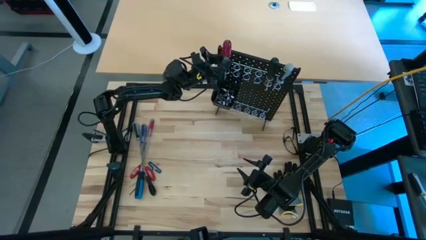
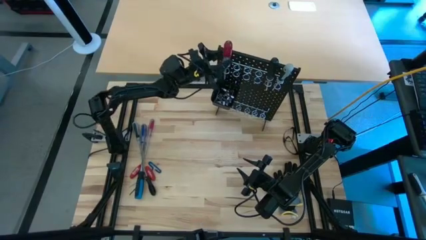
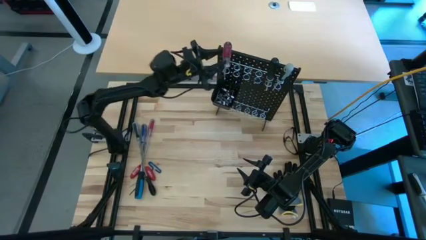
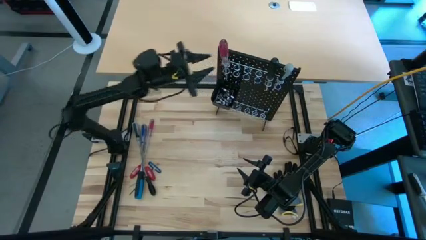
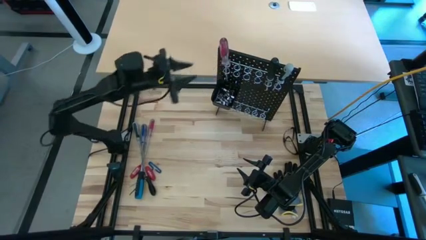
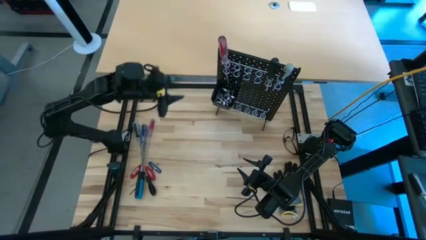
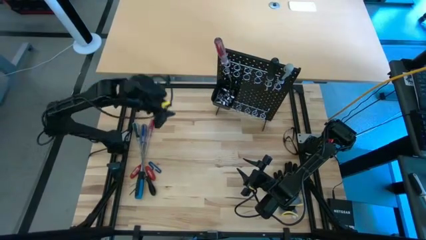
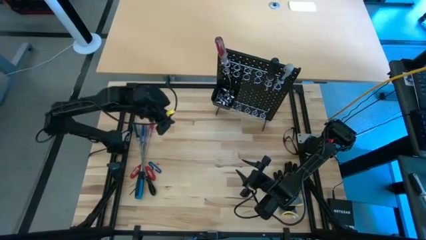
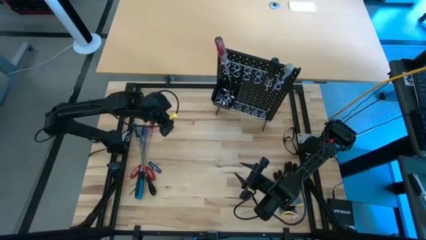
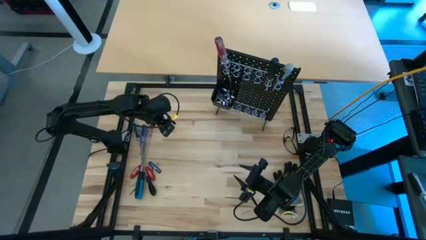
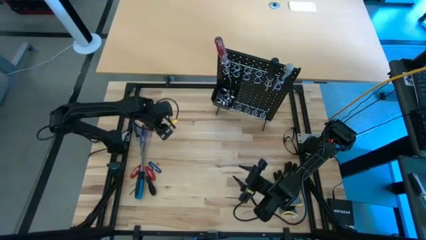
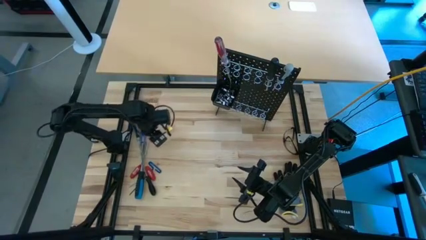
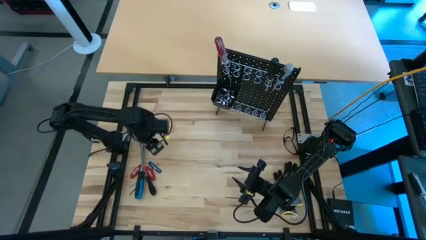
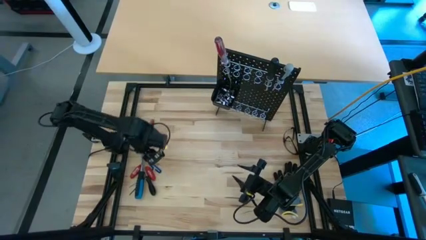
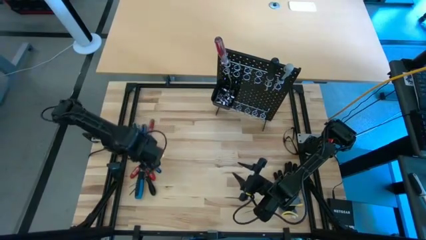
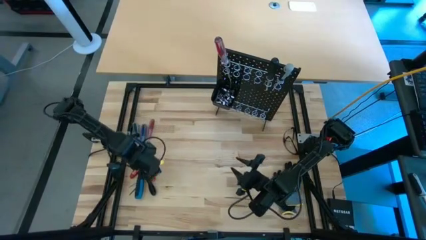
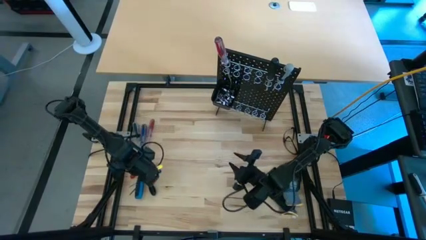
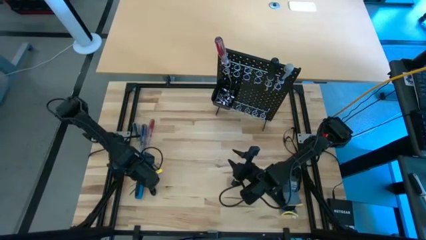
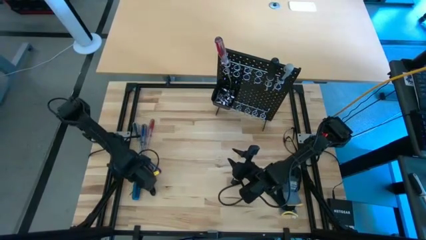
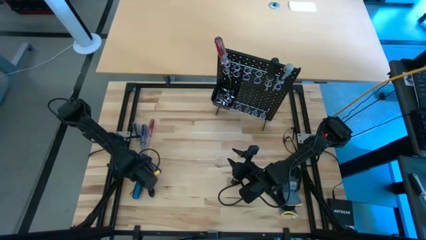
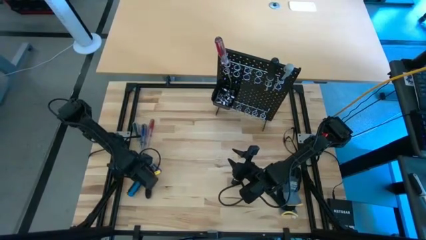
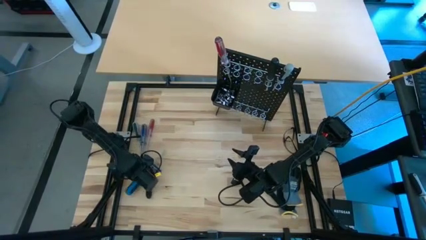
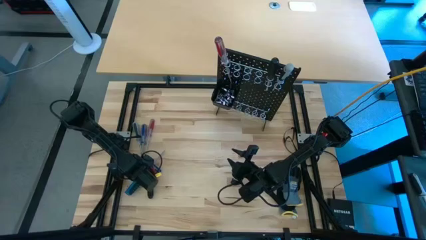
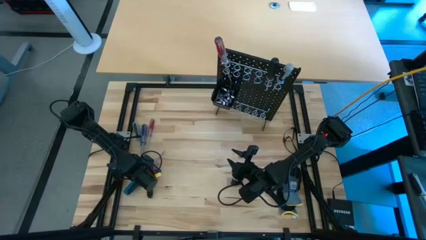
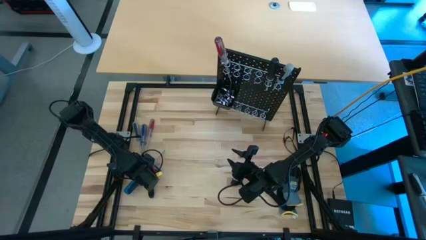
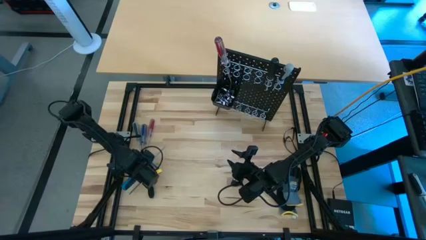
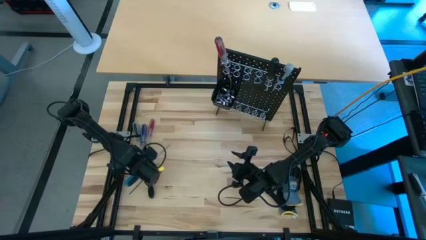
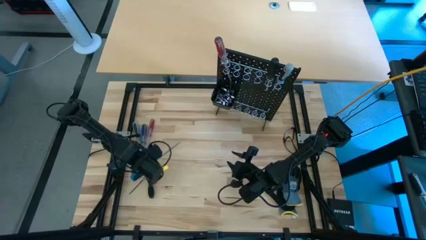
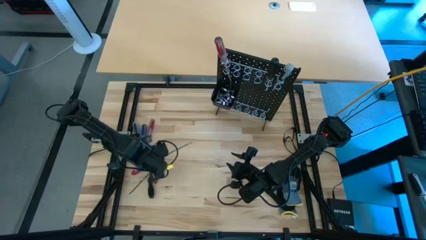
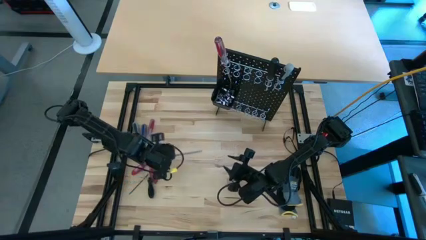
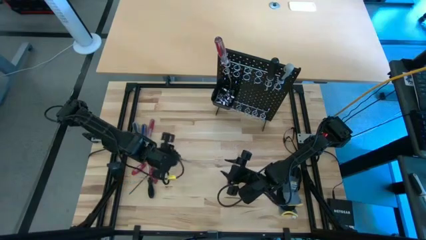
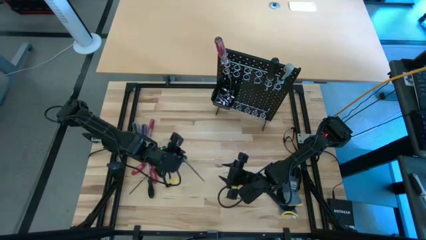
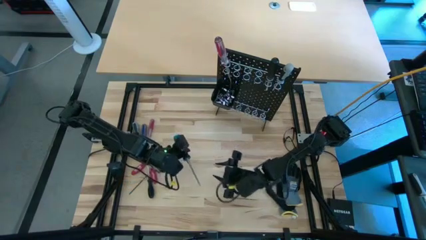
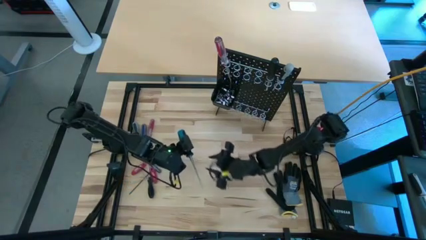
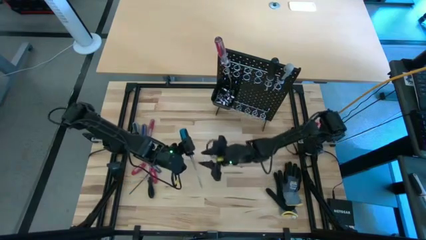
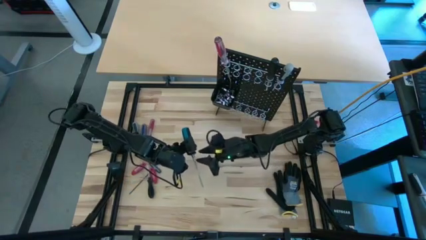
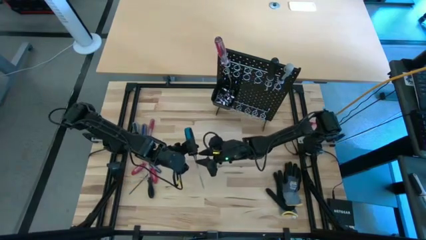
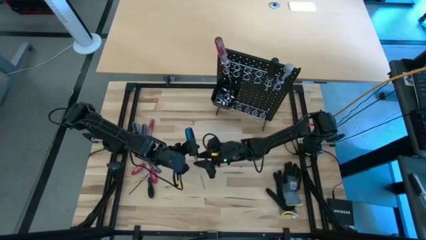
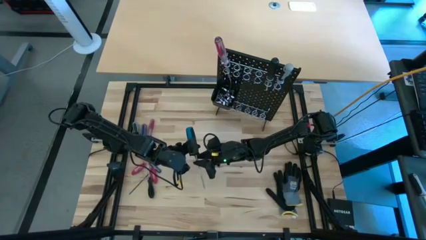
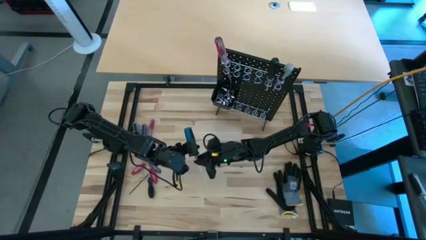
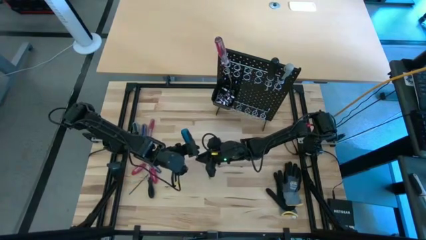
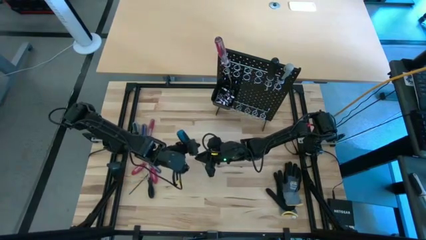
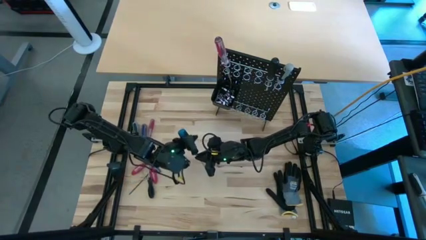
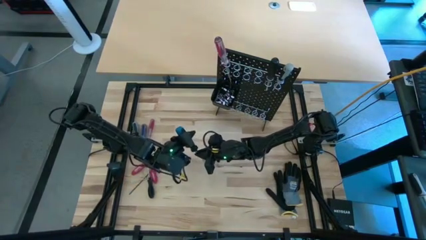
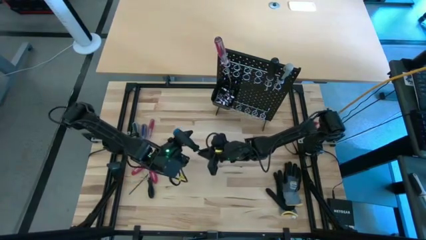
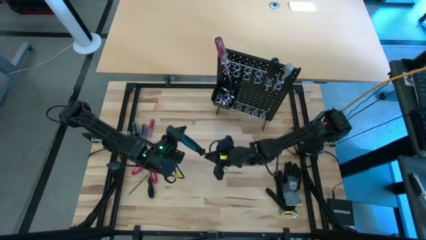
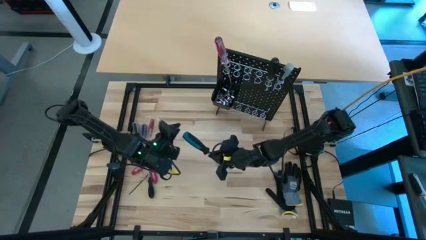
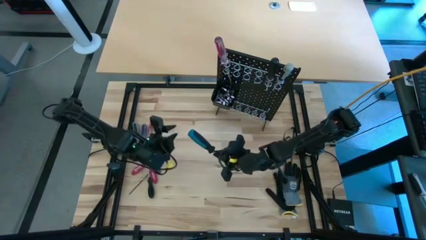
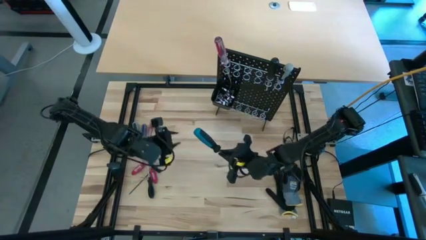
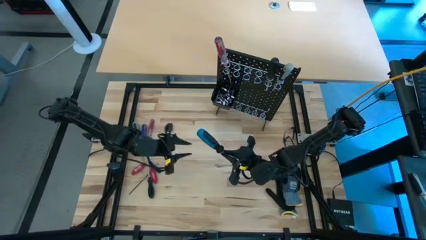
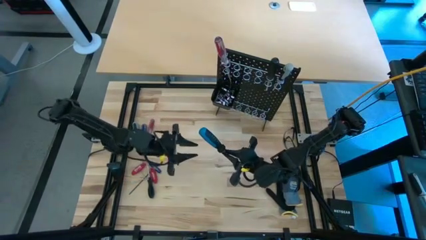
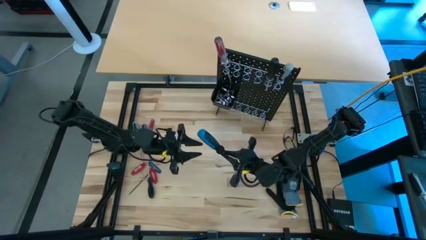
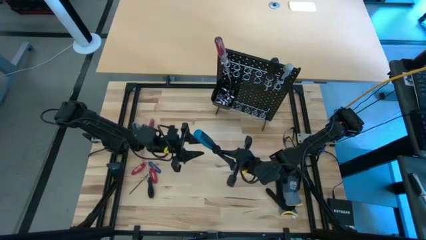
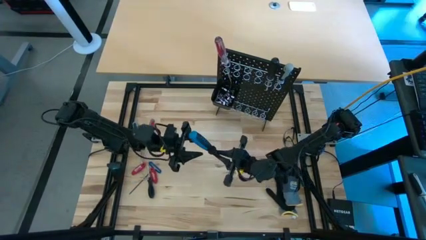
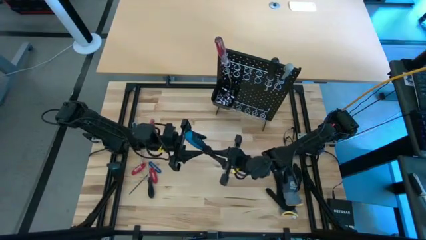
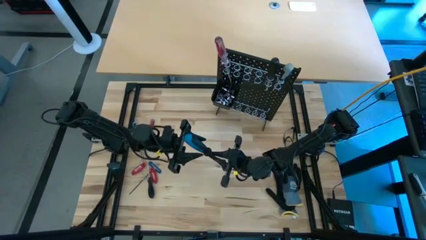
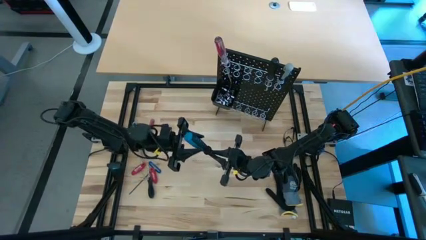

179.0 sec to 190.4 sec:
Task: Hang tools onto peg board
Hang the bottom blue screwdriver on the black pegboard

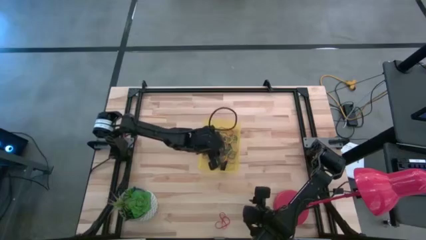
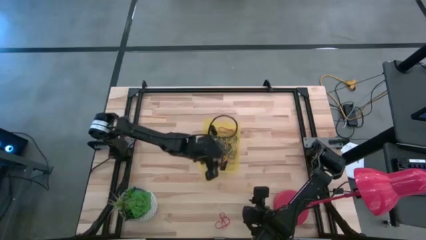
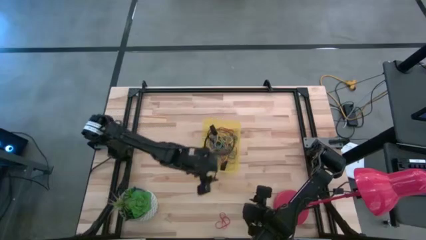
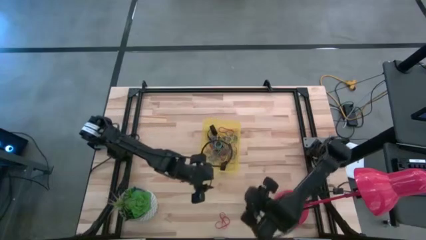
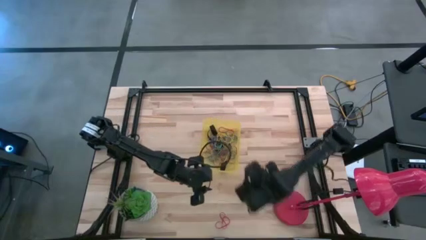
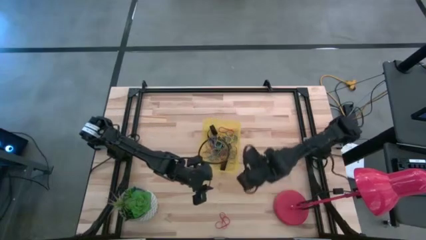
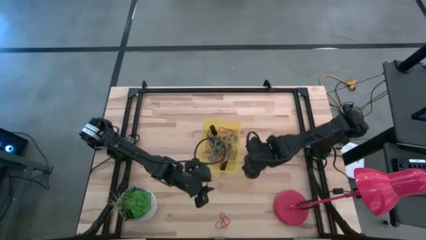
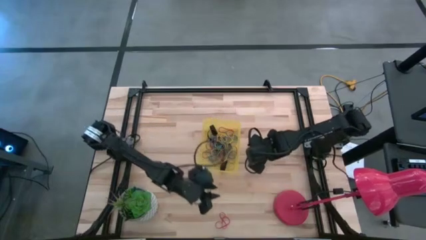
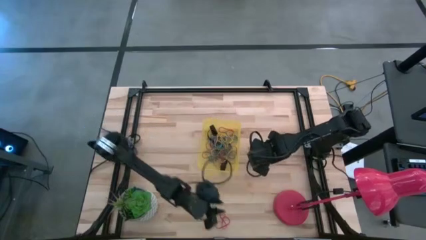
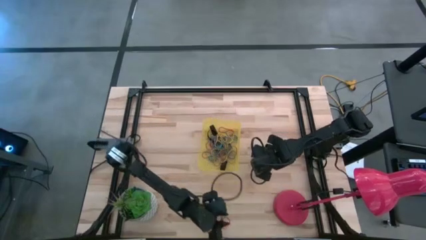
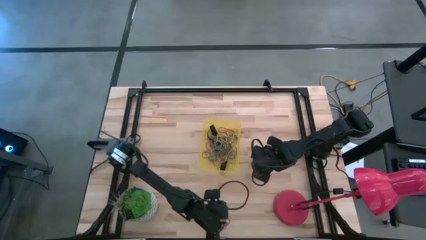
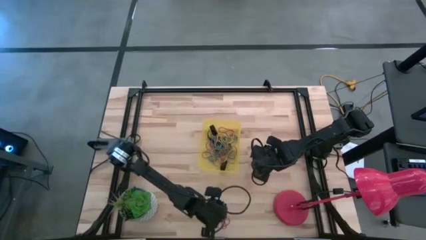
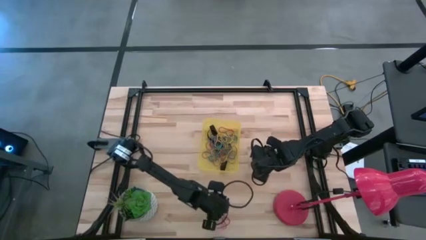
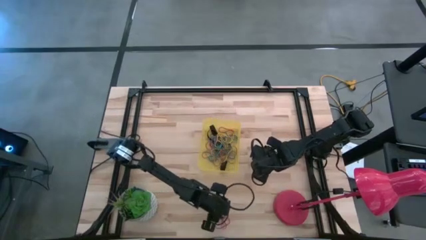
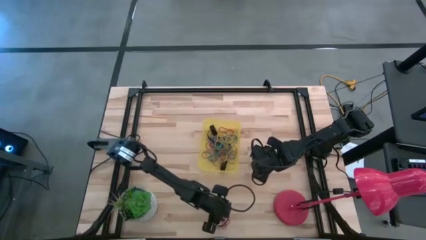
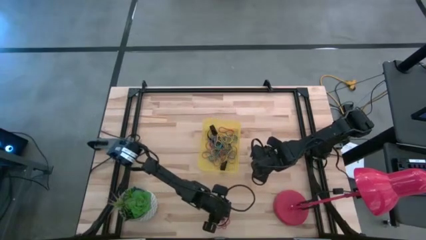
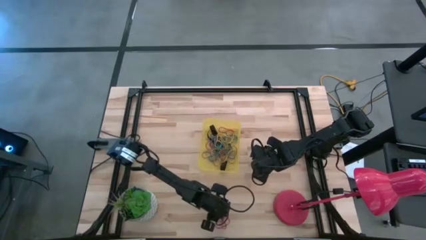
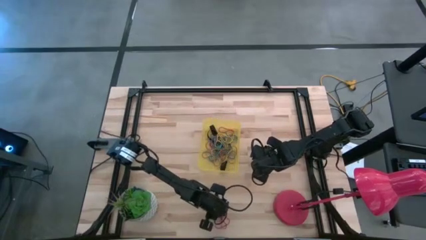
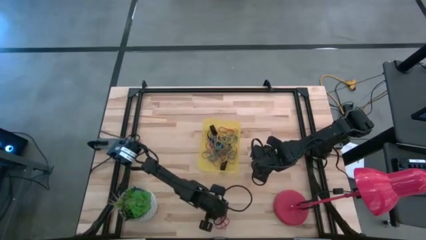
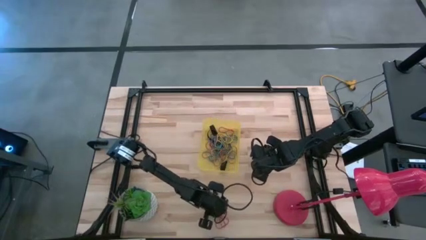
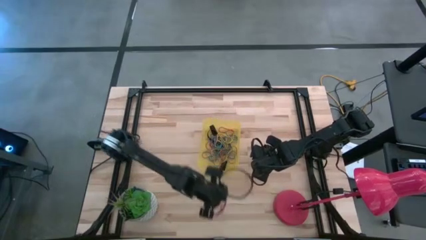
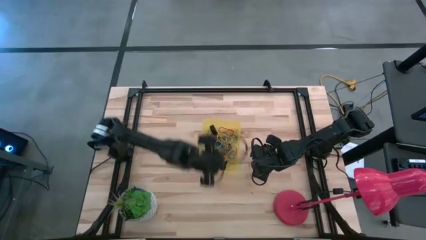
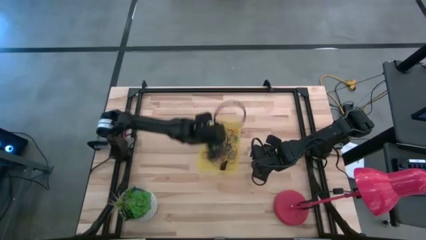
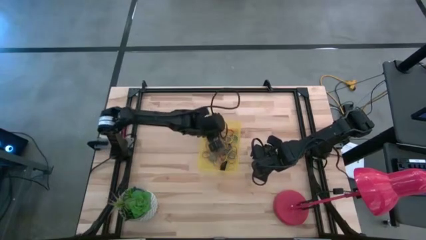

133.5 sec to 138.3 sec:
Task: Pick and place rubber bands into bin
Put the red rubber band into the yellow bin
